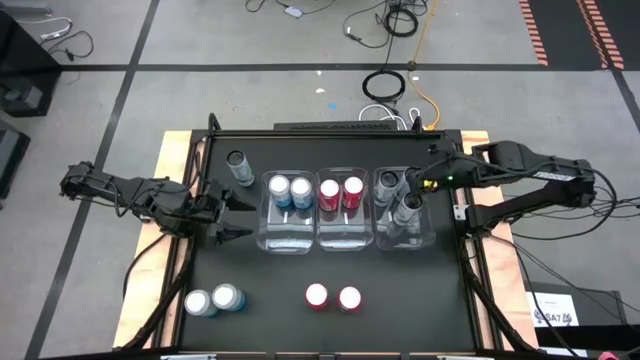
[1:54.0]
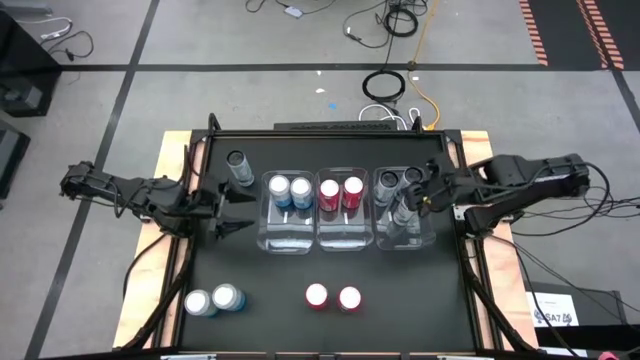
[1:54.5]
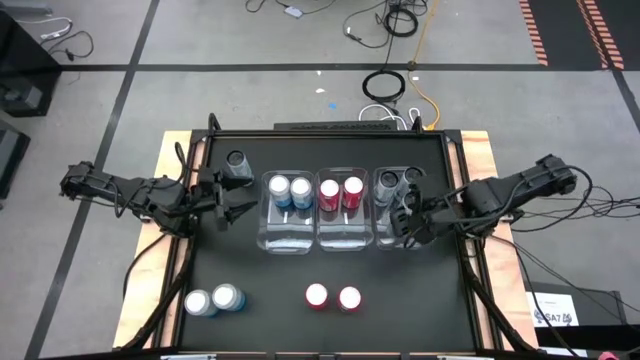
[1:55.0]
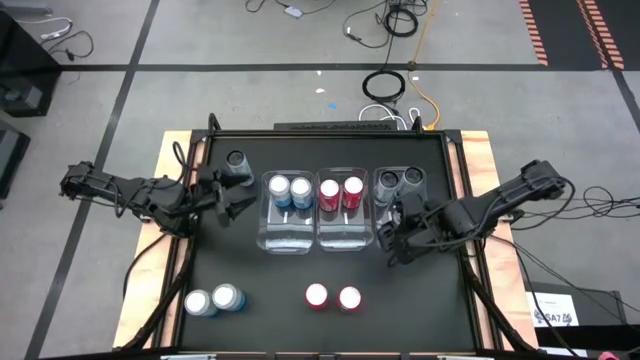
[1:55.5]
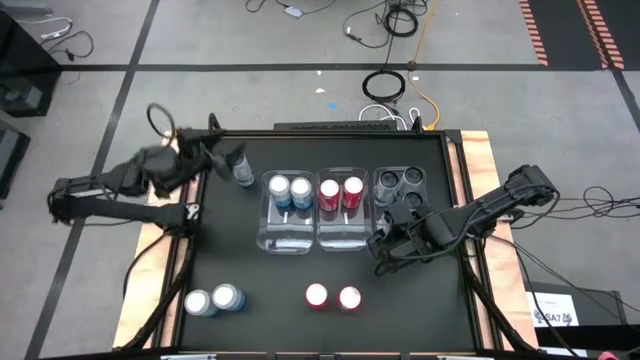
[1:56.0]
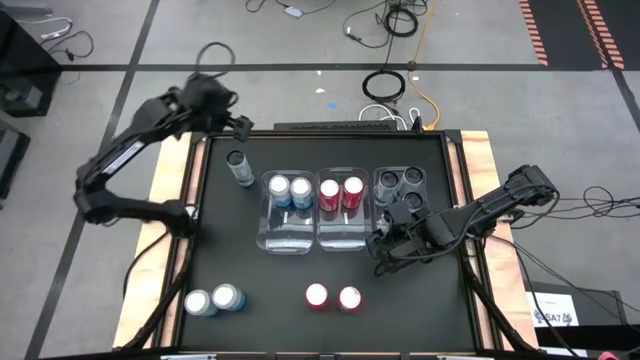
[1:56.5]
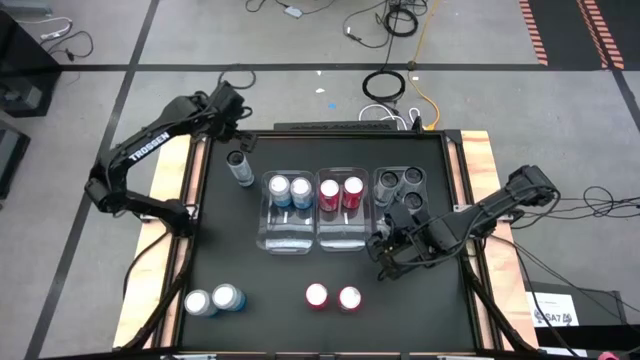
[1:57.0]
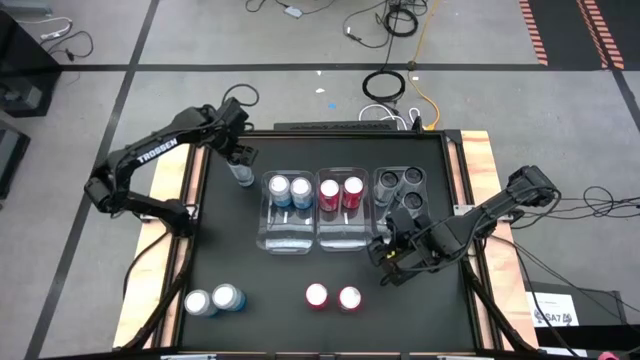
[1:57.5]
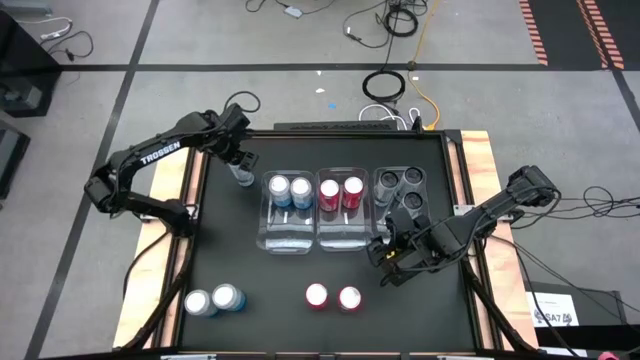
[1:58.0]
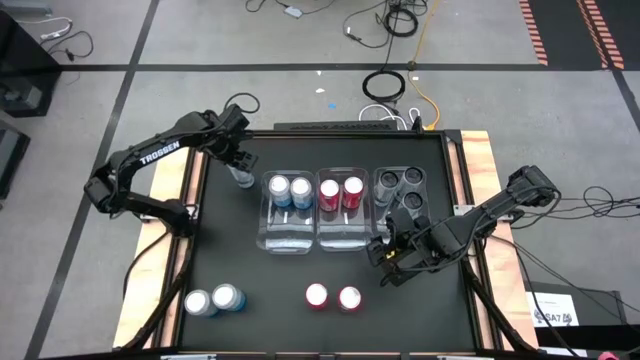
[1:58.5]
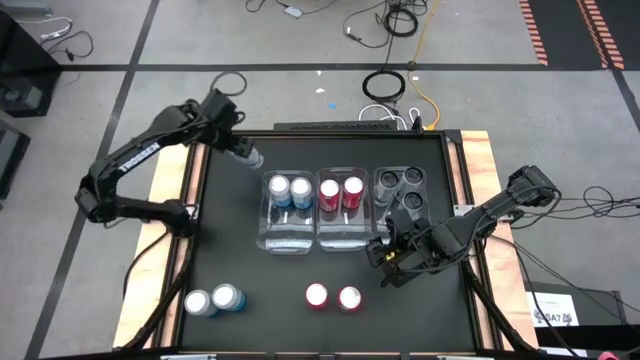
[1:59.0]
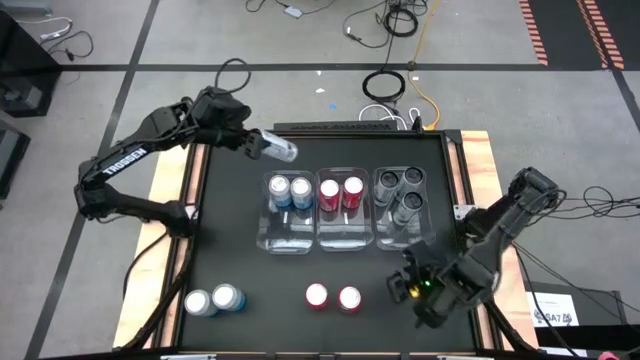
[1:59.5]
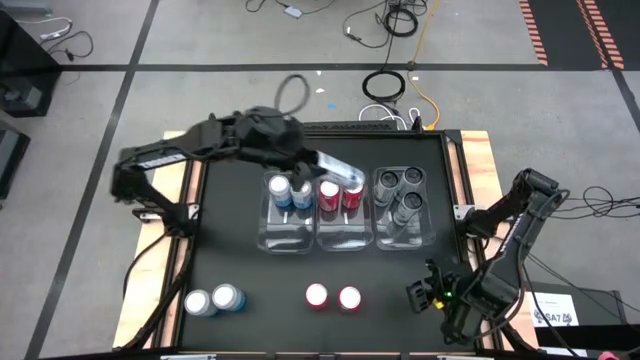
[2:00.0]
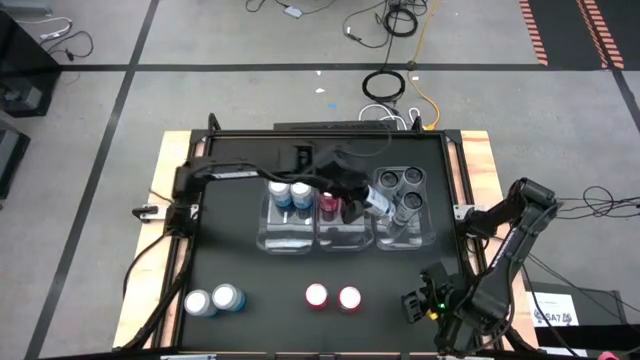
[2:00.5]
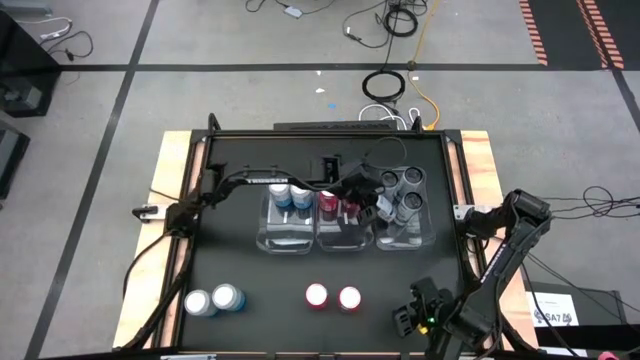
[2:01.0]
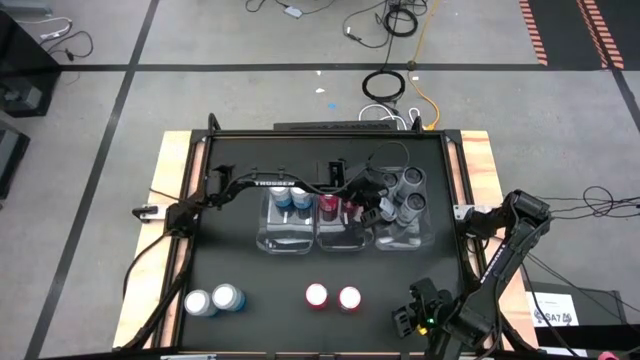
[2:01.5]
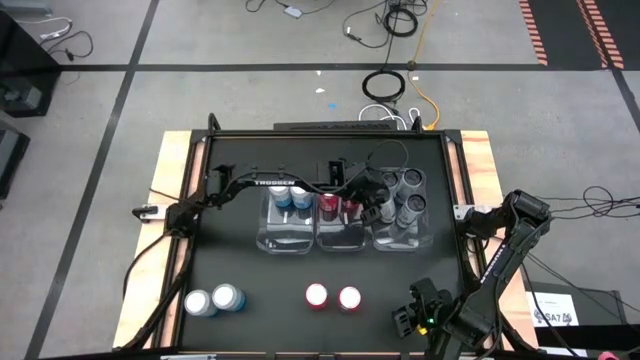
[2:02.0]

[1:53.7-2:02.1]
Task: Sort soda cans
Put the white-blue soda can into the right transparent bin

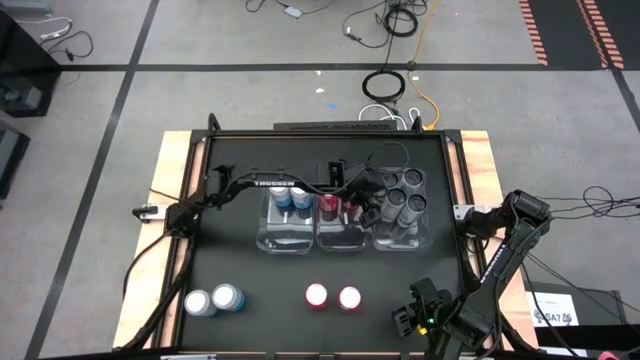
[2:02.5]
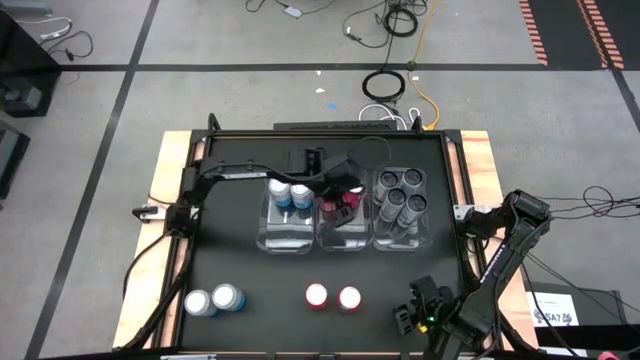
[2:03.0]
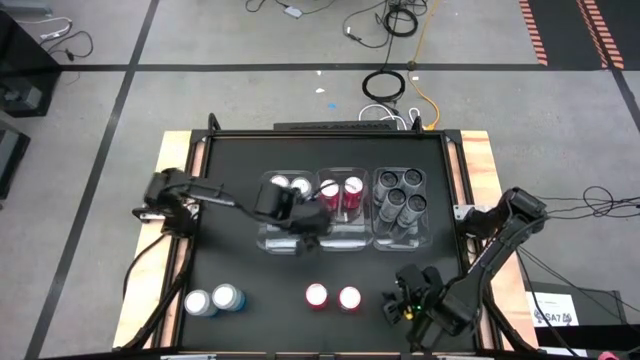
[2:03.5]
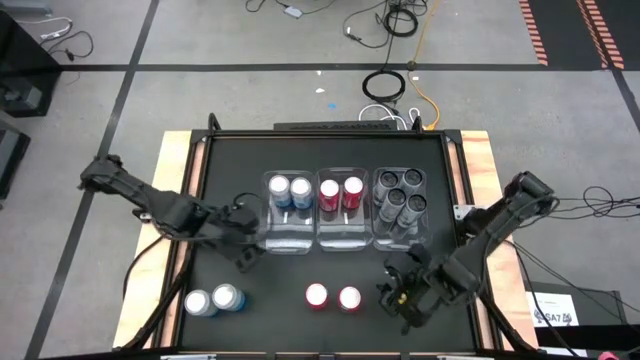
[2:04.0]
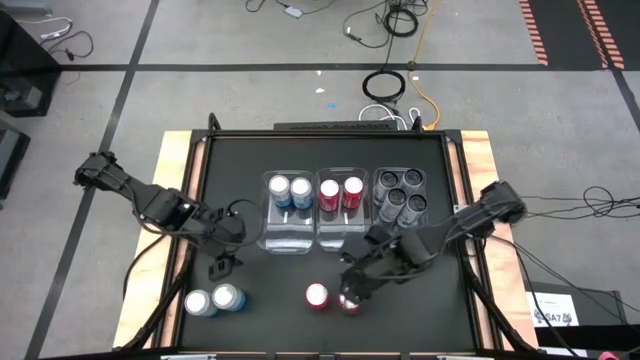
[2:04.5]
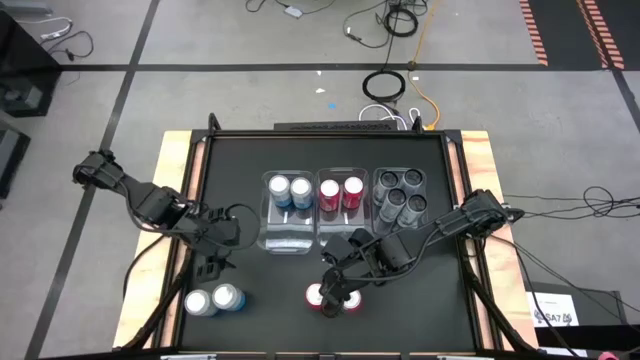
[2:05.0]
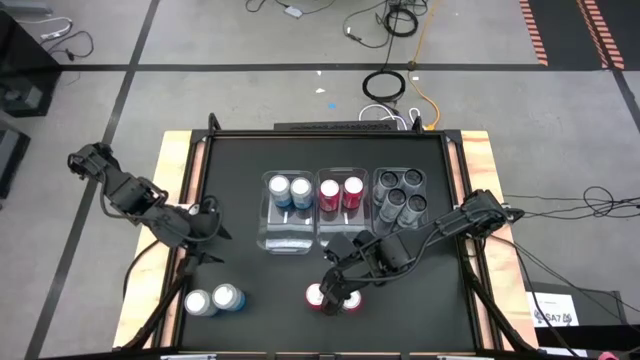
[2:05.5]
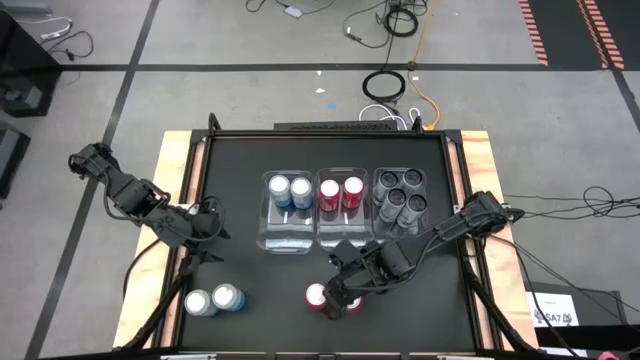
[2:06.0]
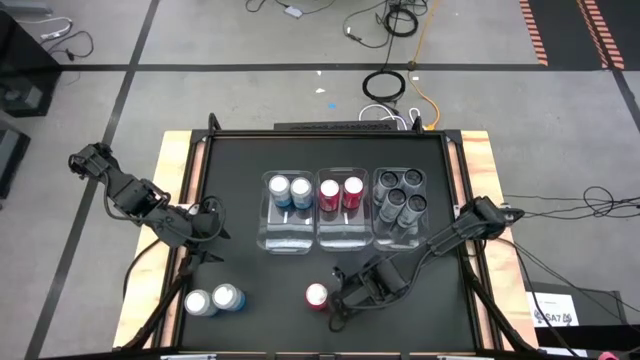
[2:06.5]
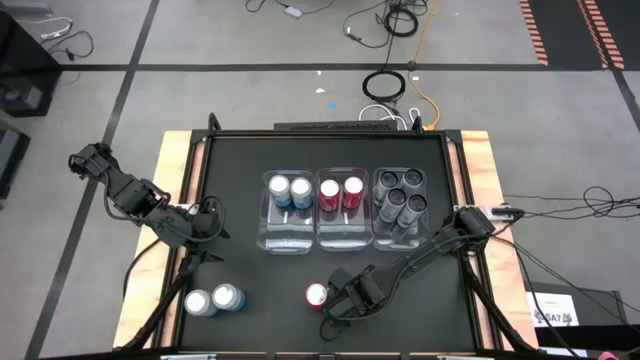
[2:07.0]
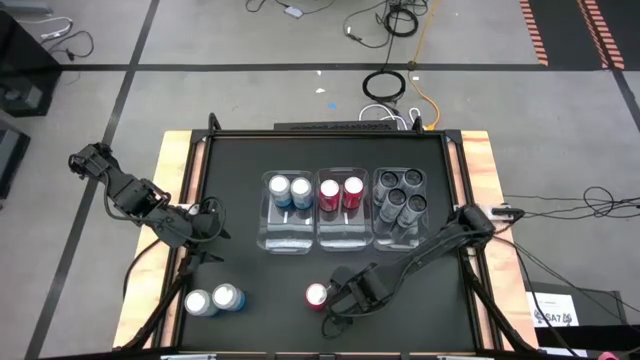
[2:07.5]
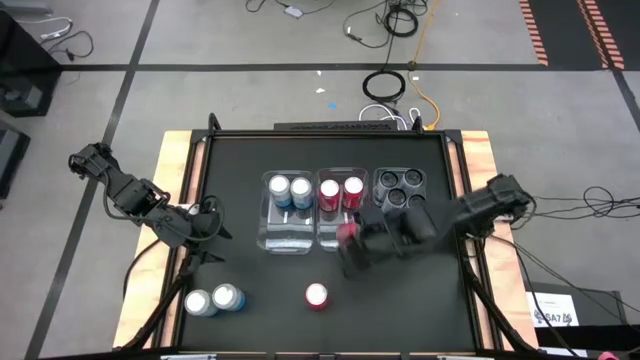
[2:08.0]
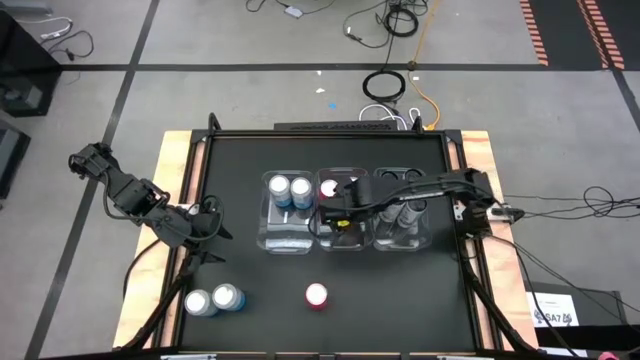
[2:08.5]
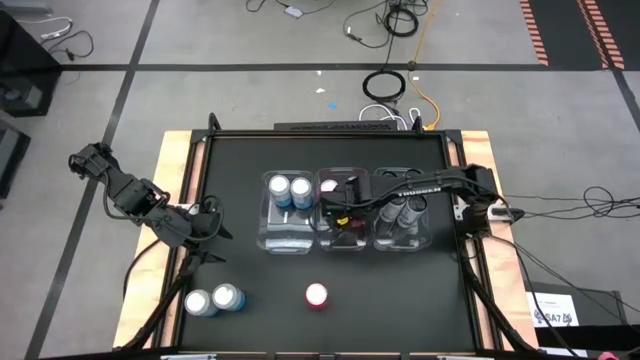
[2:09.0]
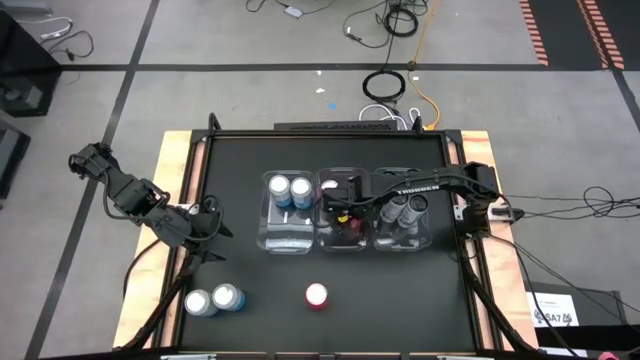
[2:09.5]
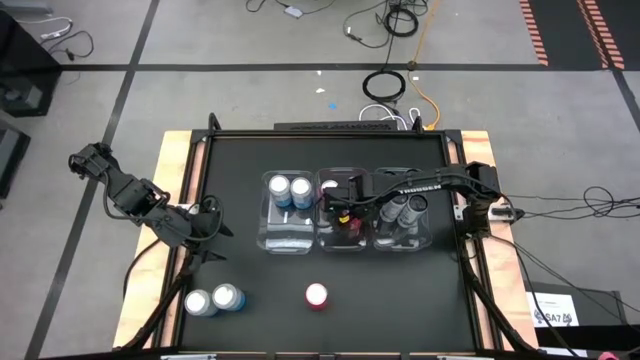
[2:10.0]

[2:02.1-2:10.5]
Put the orange soda can into the center transparent bin

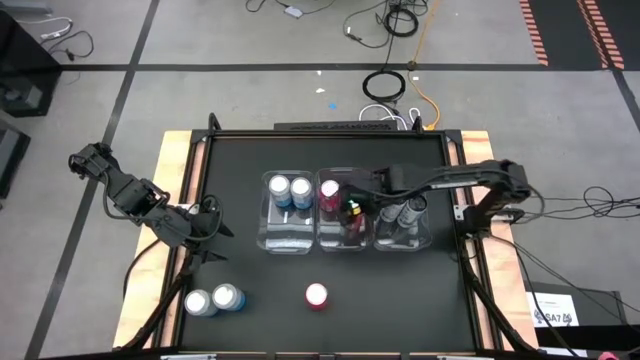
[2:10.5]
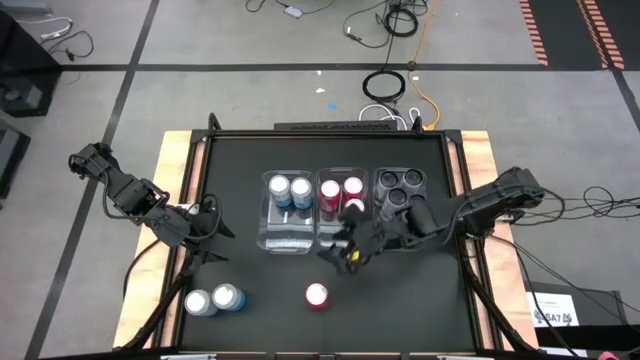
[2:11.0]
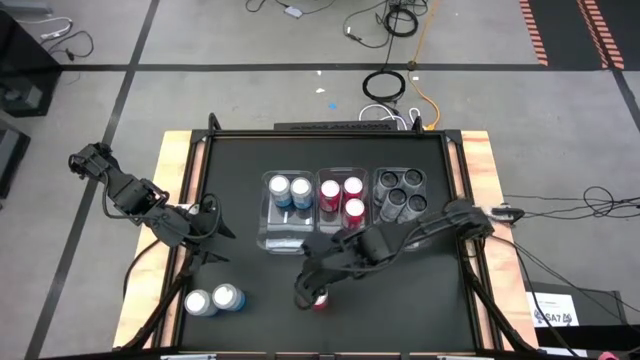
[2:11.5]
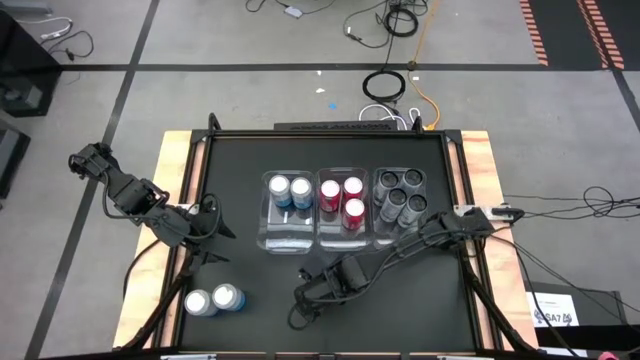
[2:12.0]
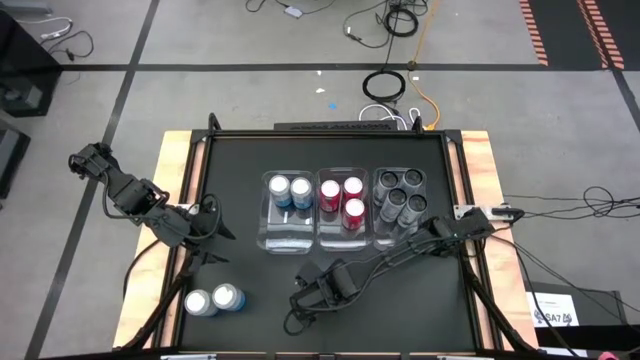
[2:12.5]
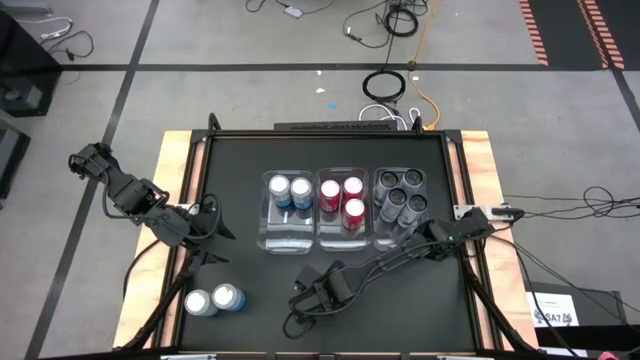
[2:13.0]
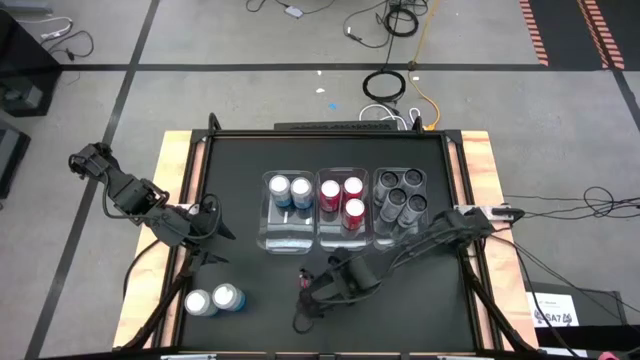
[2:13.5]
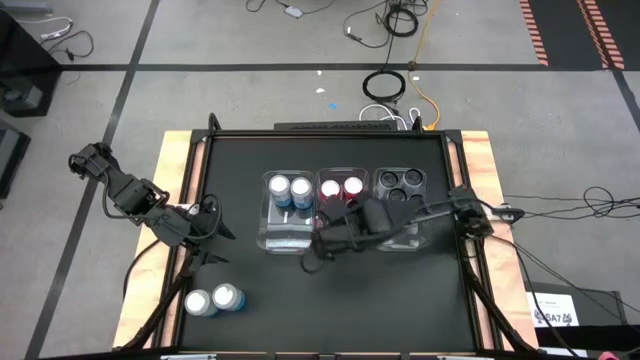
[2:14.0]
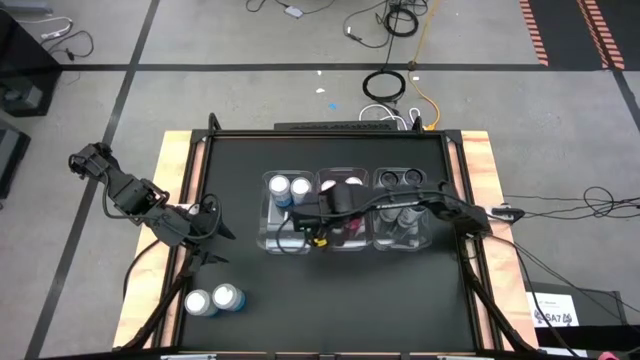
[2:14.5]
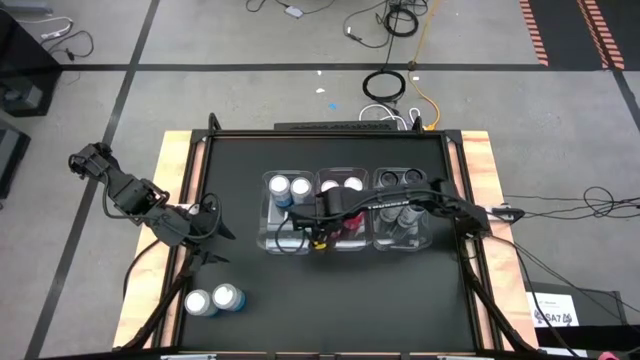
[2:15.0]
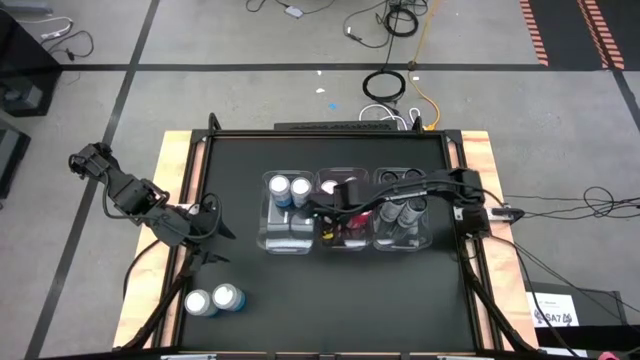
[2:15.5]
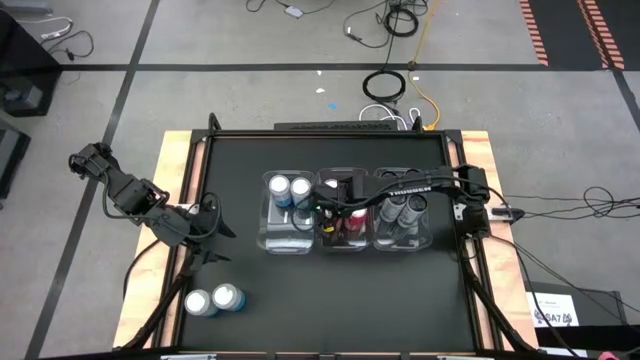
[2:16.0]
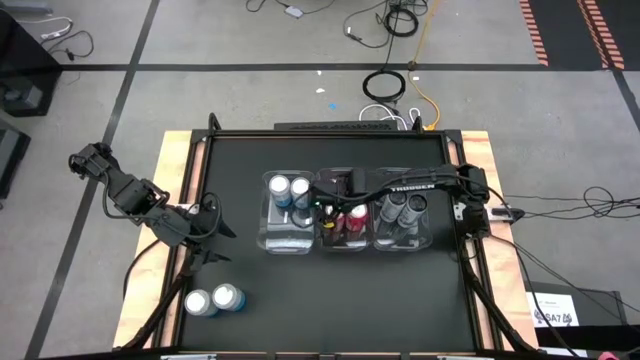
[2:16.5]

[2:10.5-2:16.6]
Put the orange soda can into the center transparent bin
